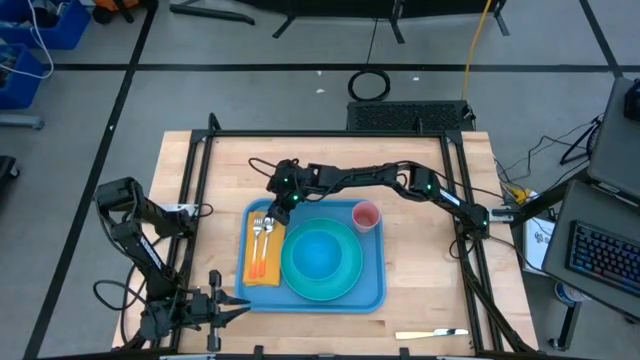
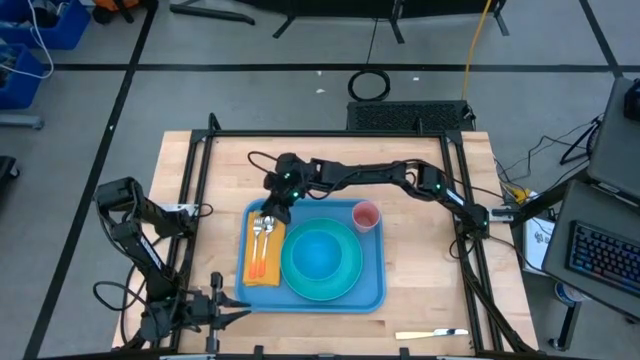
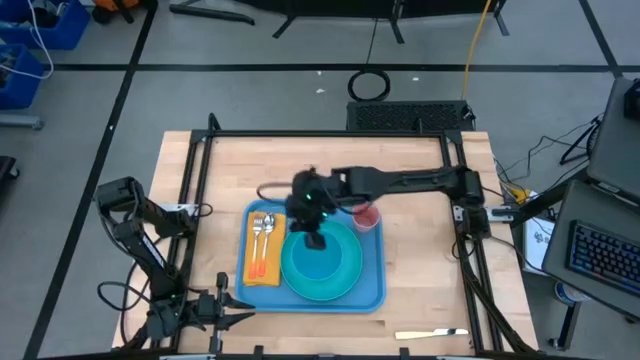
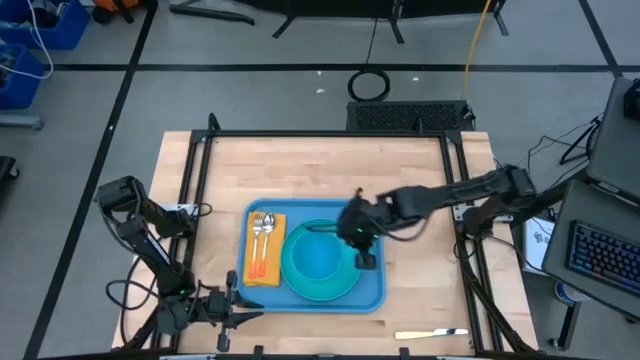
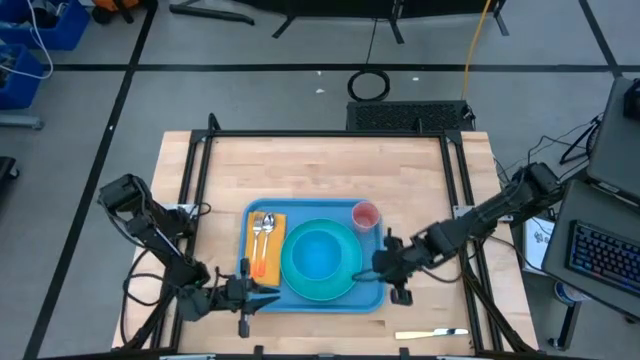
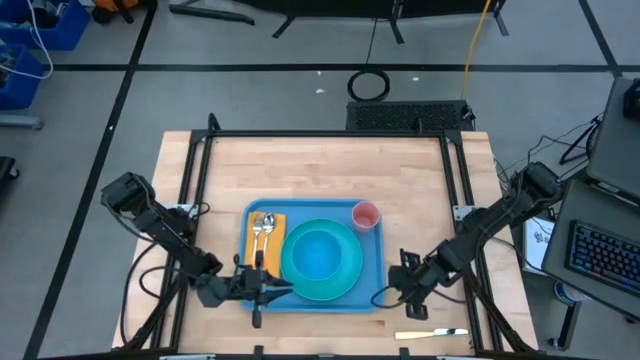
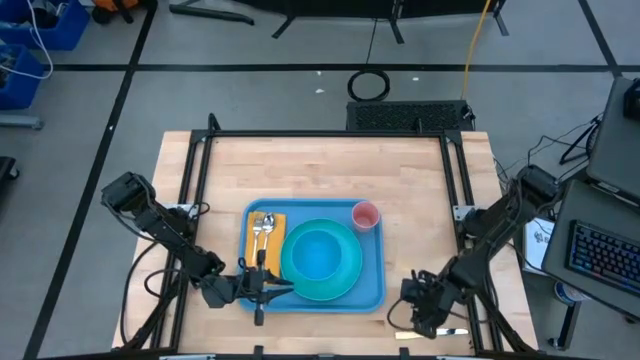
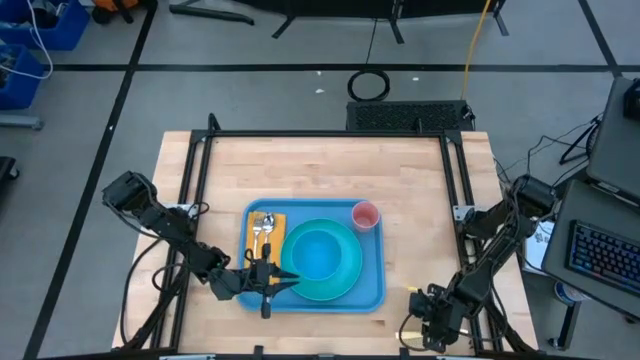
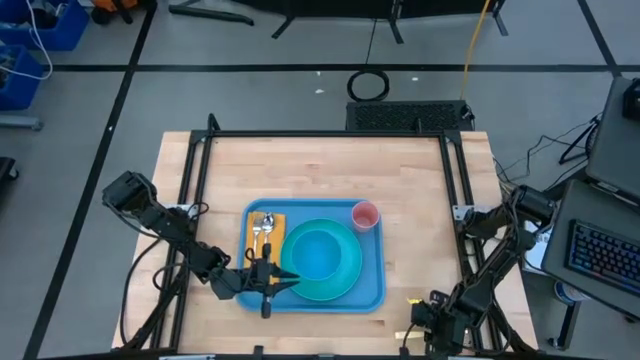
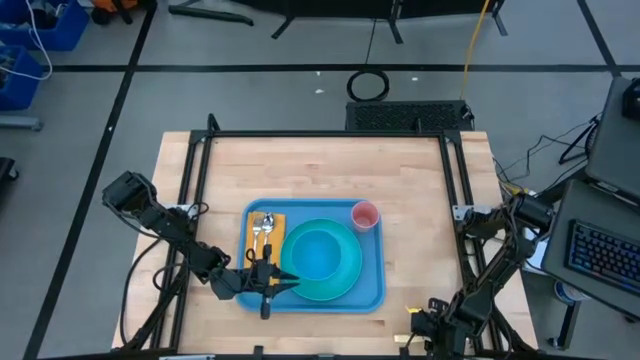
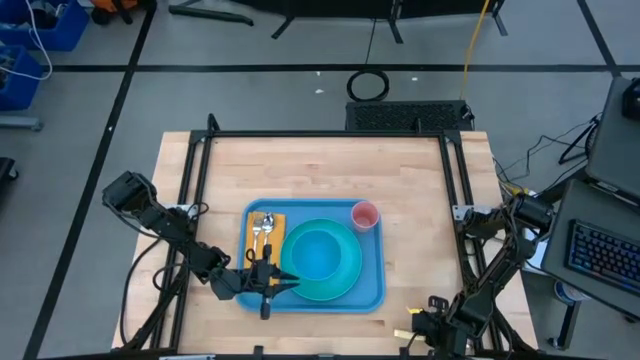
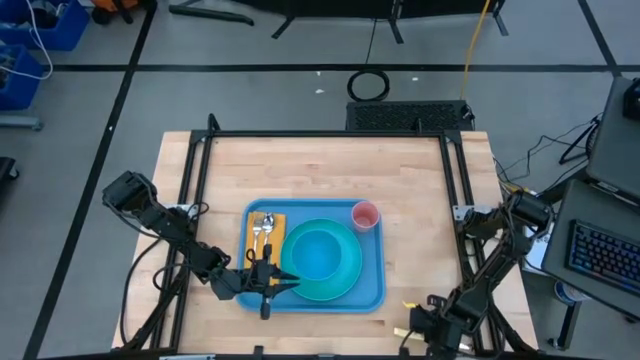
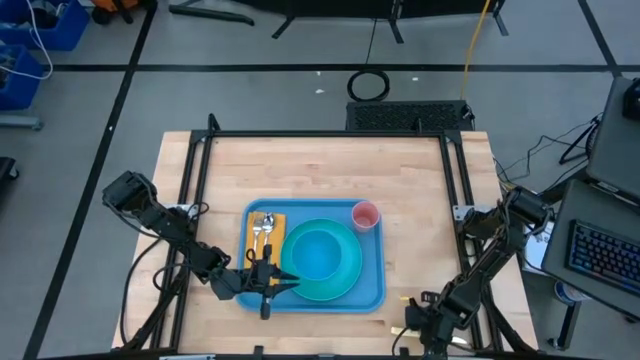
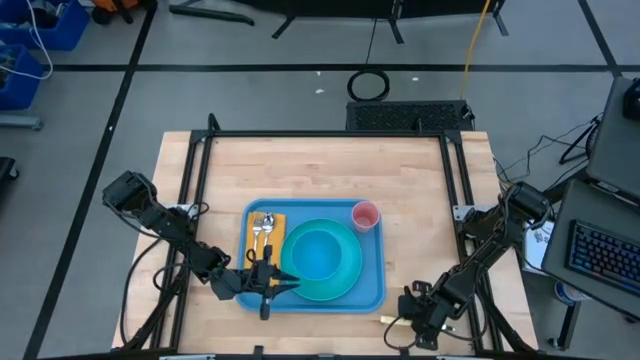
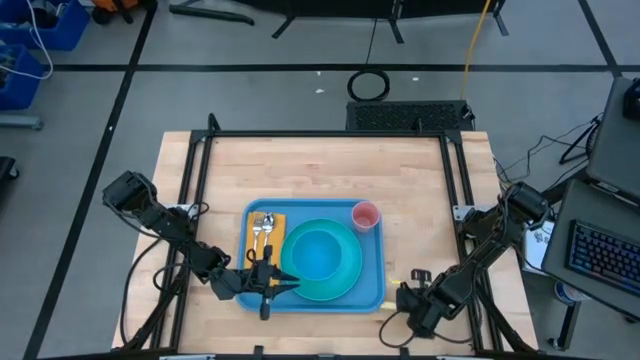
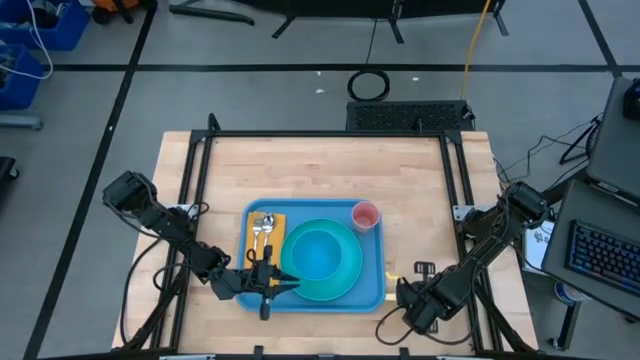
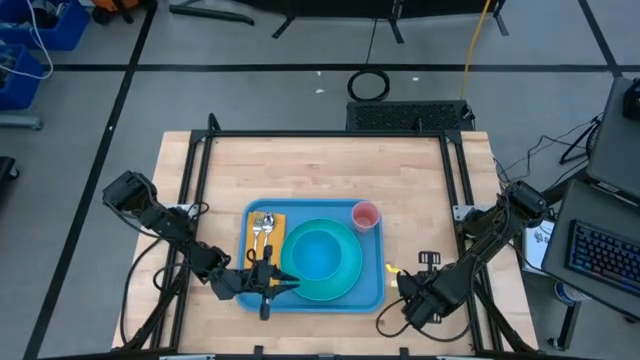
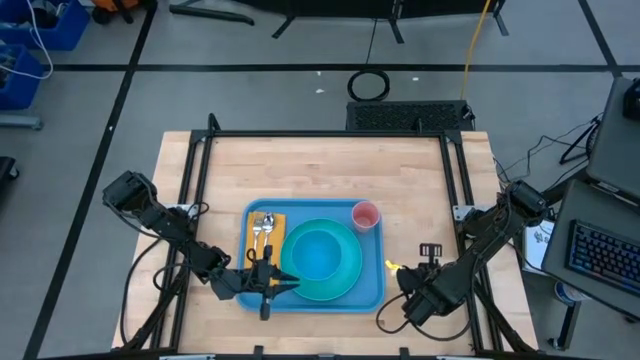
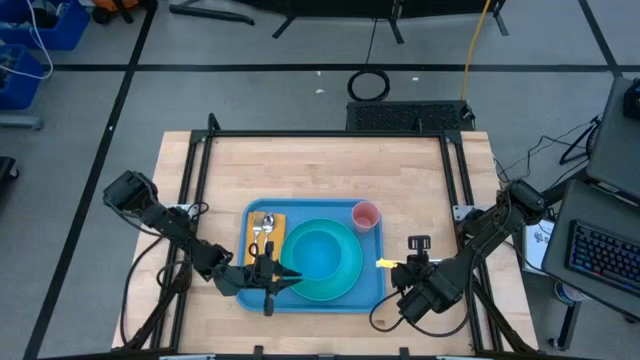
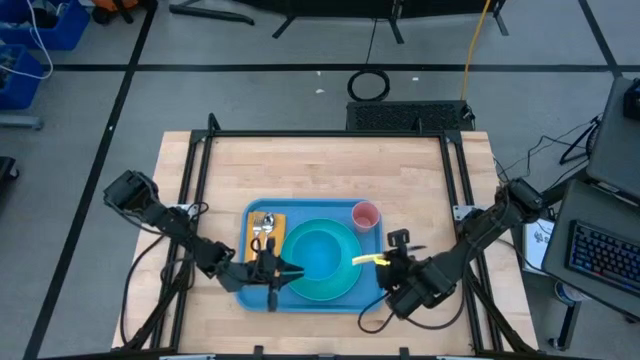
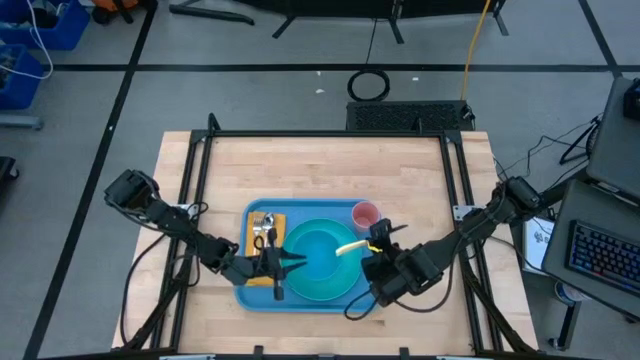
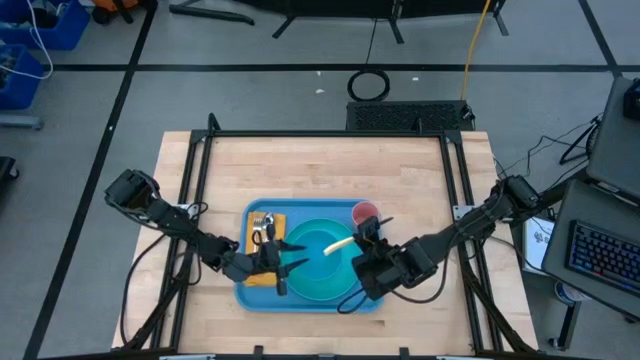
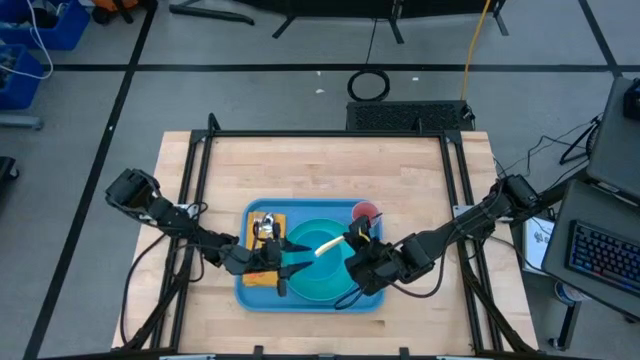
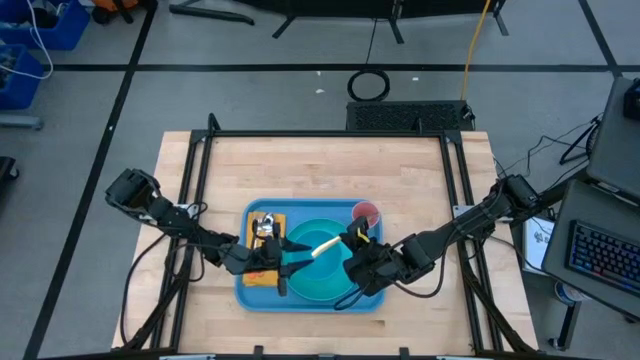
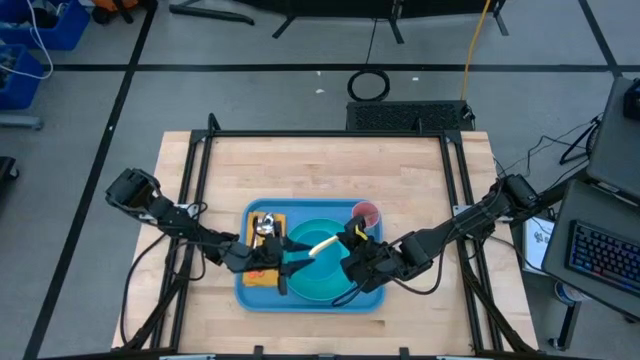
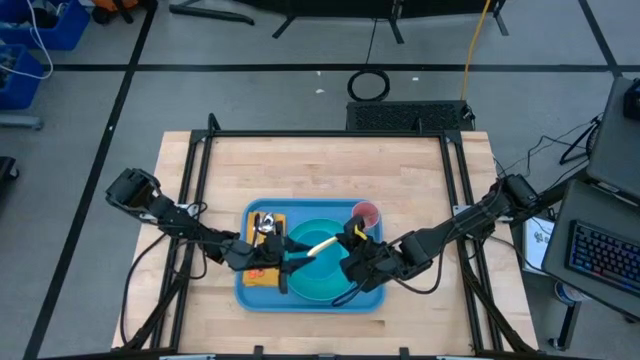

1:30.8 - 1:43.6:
Task: Set up tray
Put the knife on top of the yellow napkin beside the spoon

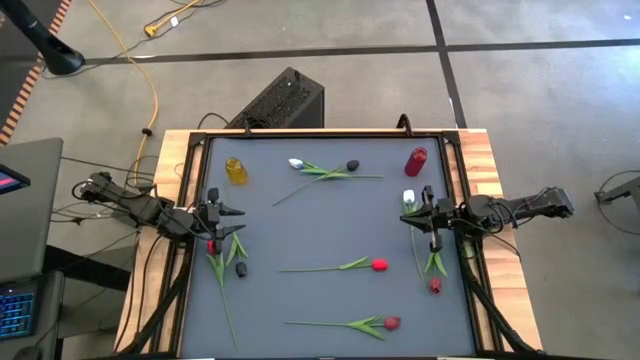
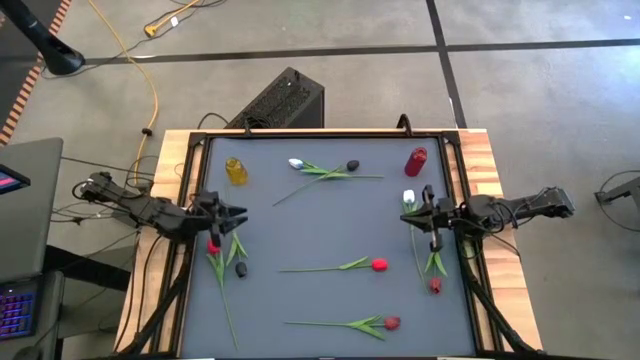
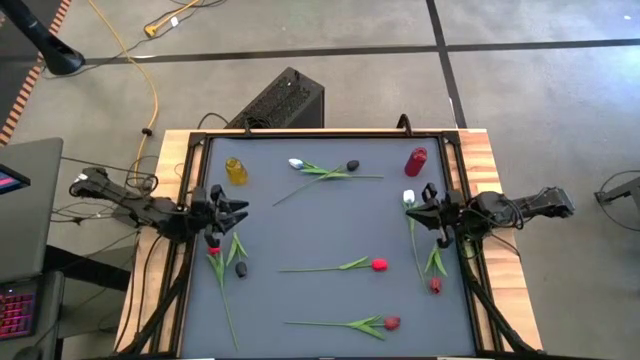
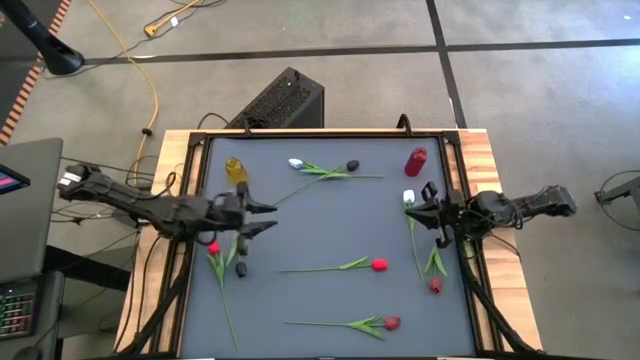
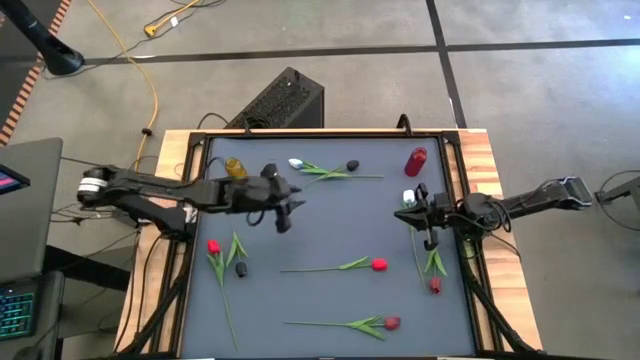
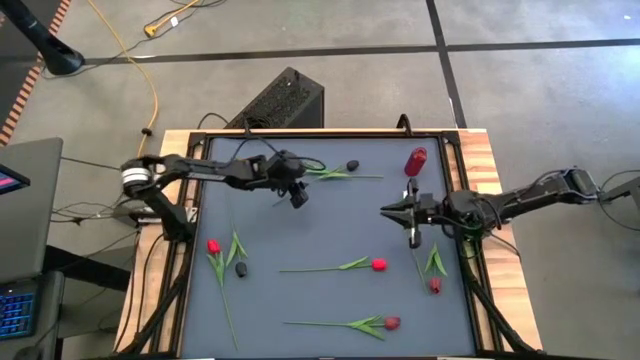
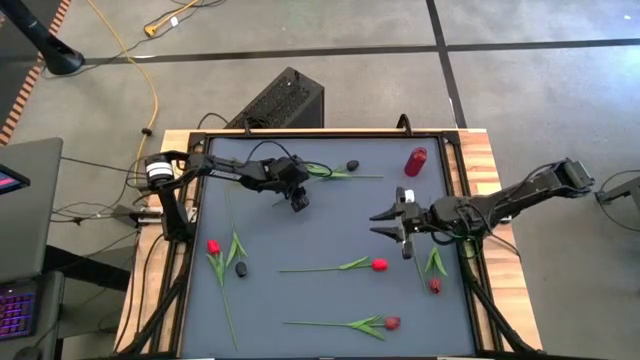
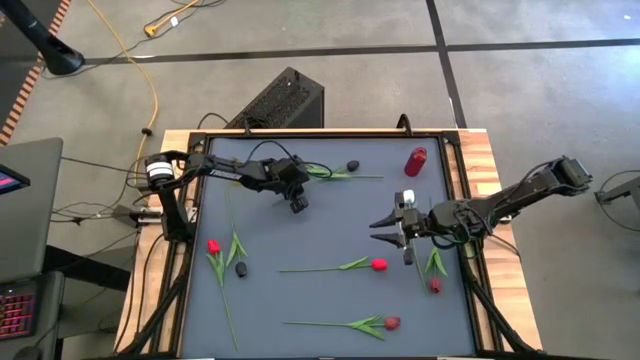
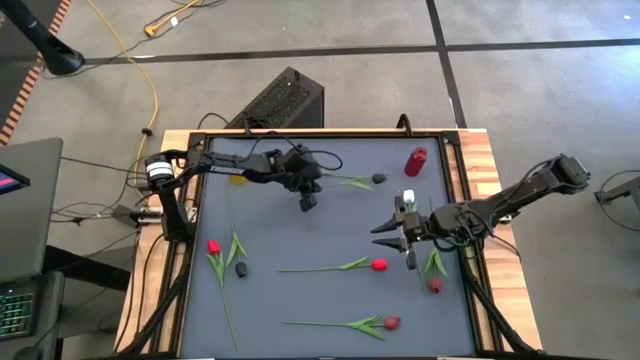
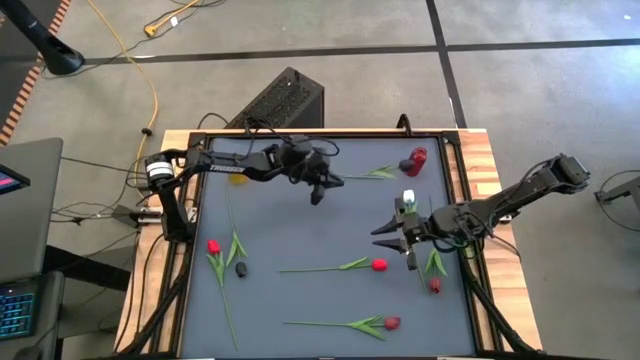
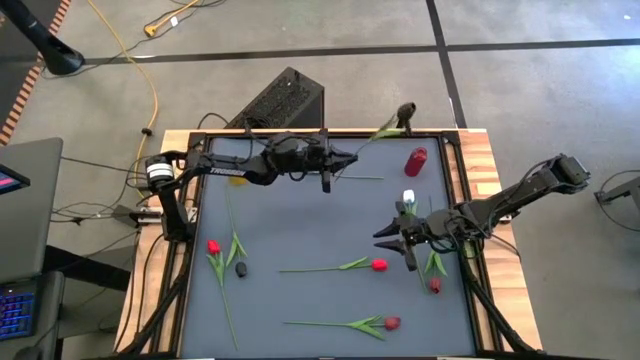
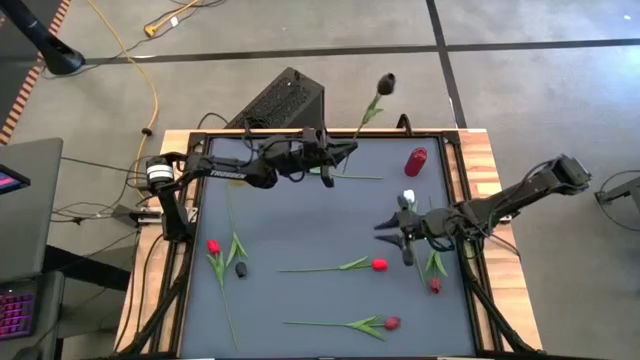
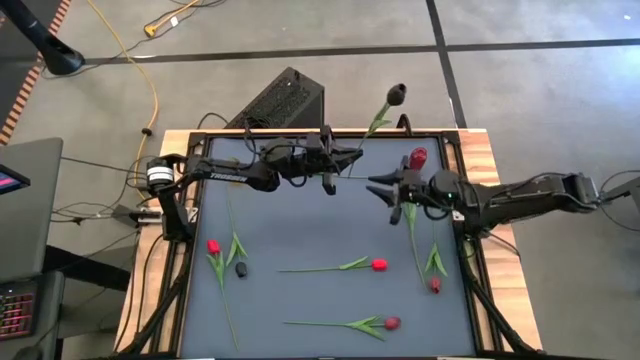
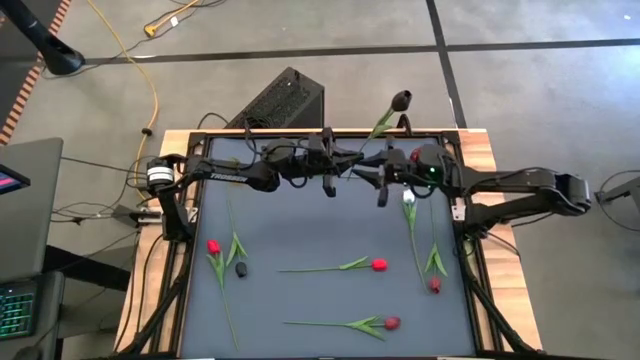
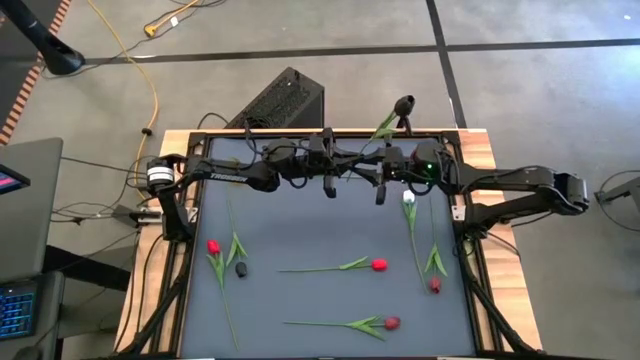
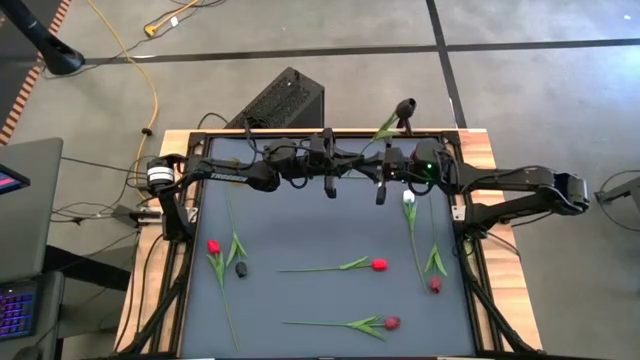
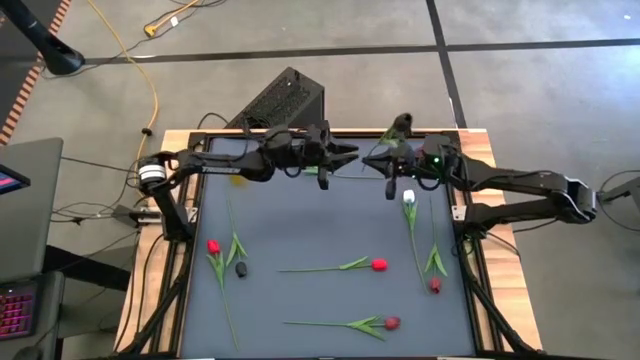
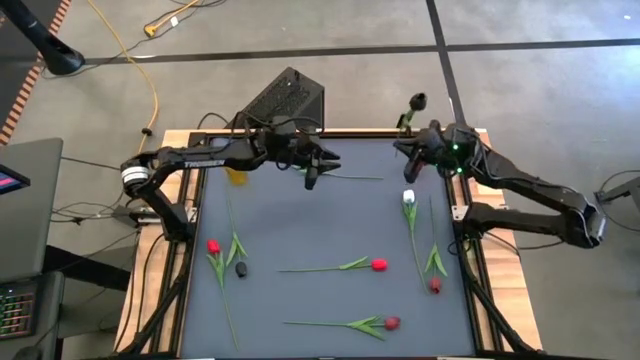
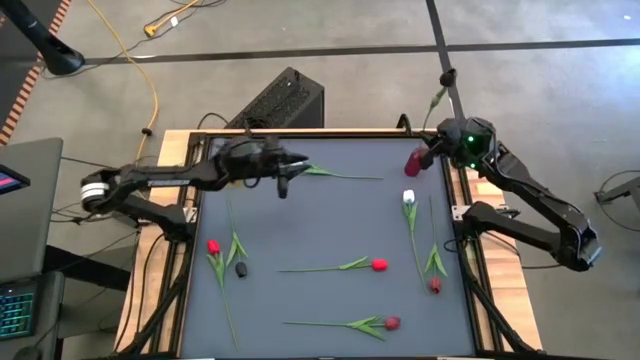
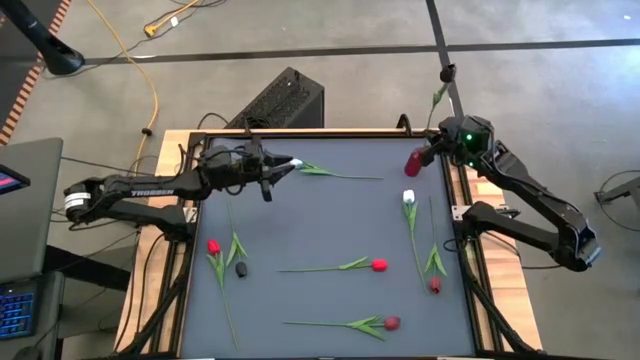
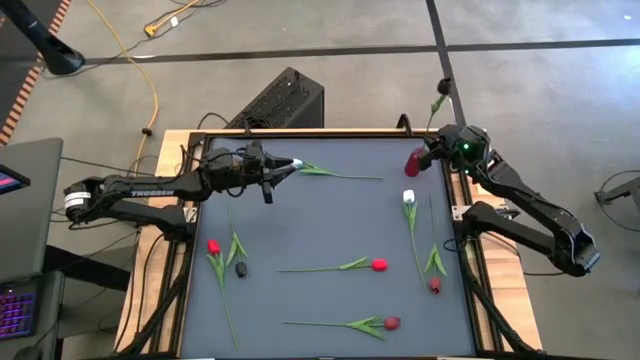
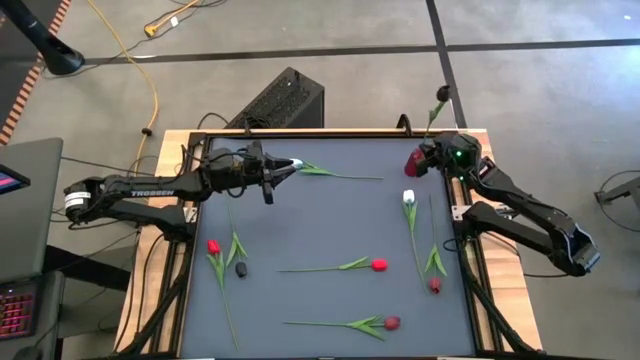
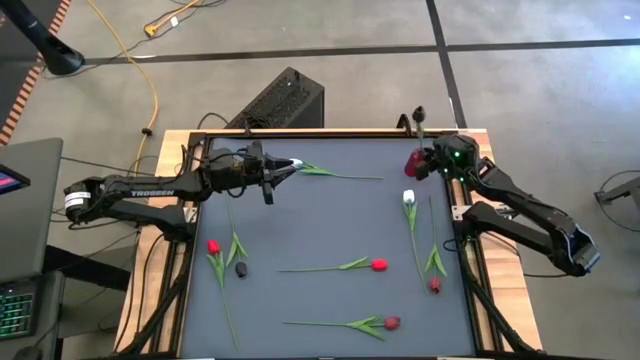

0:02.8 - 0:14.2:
Task: Sort flowers into vase by color
Put the top black tulip into the red flower vase
